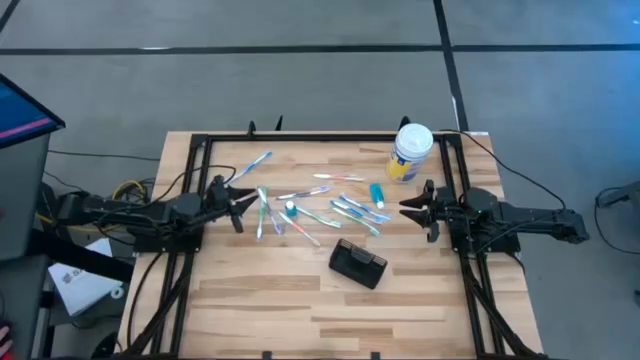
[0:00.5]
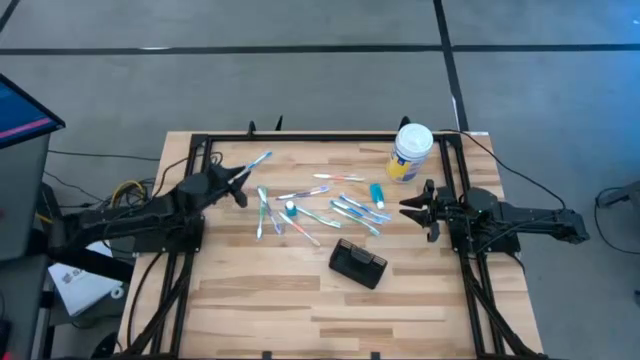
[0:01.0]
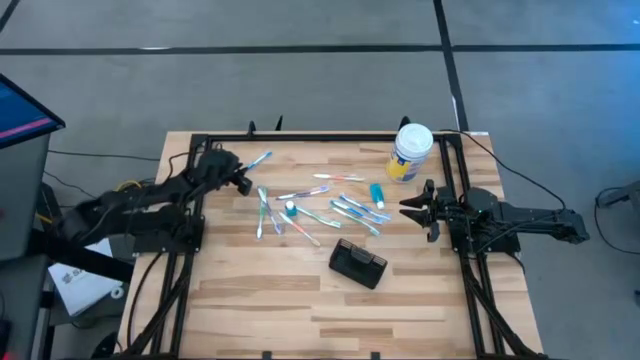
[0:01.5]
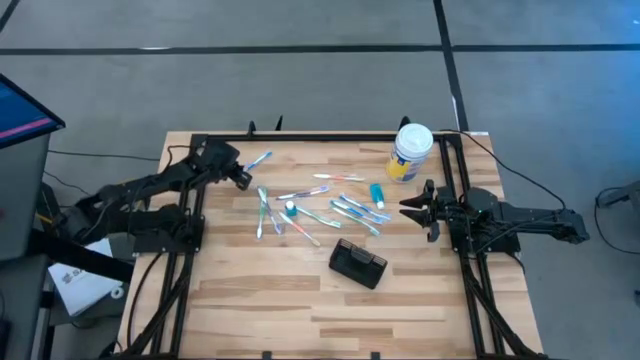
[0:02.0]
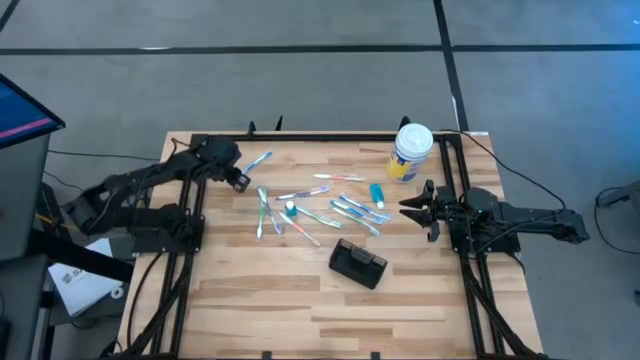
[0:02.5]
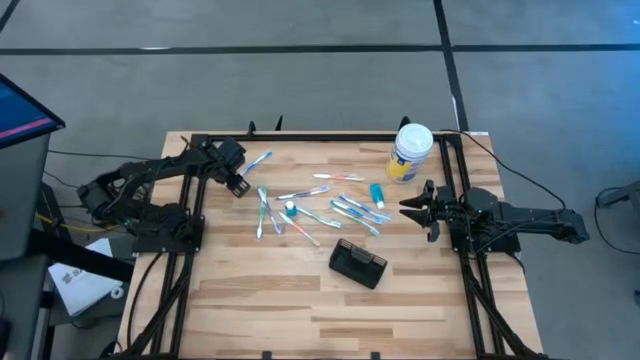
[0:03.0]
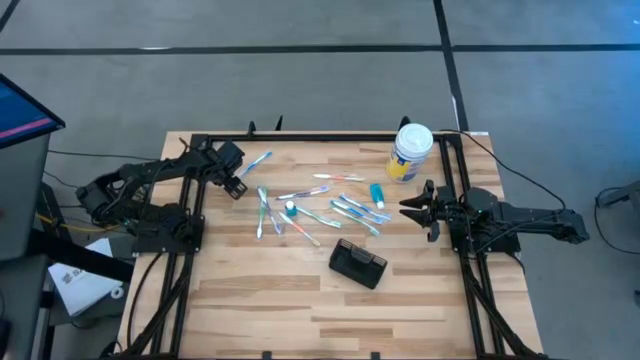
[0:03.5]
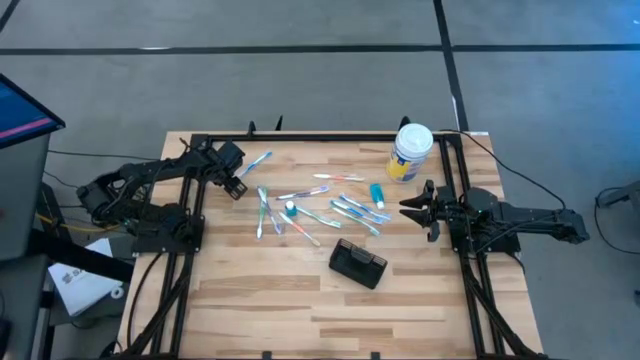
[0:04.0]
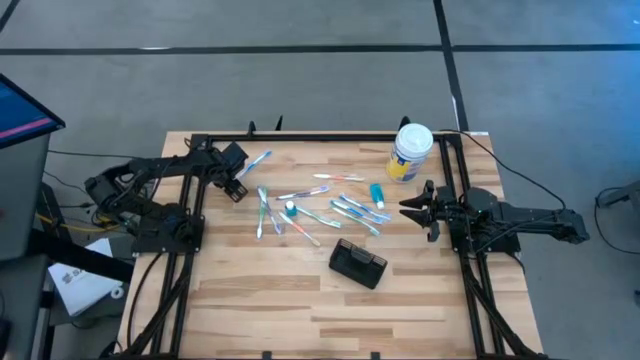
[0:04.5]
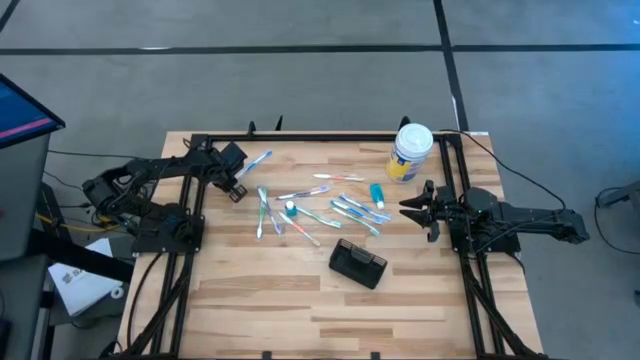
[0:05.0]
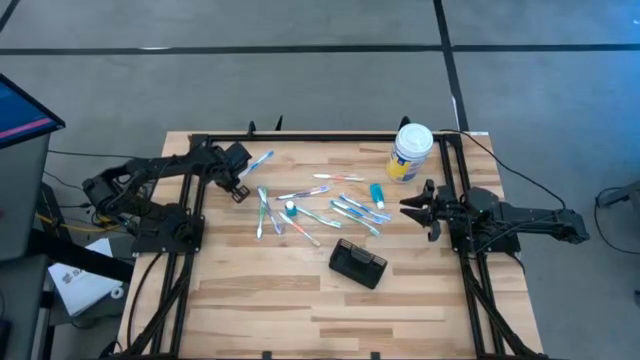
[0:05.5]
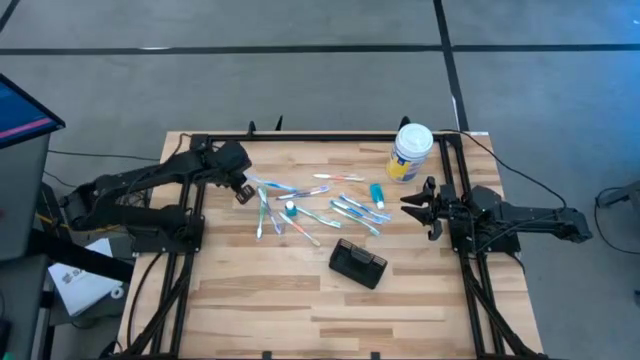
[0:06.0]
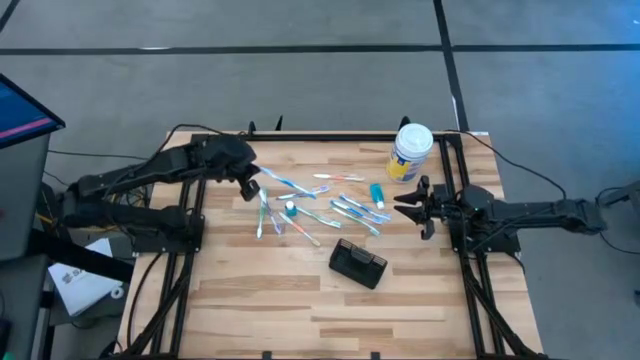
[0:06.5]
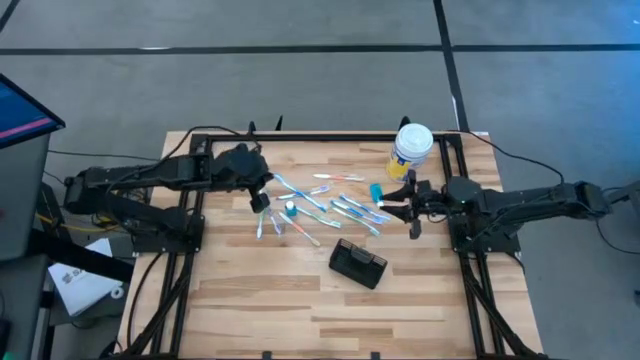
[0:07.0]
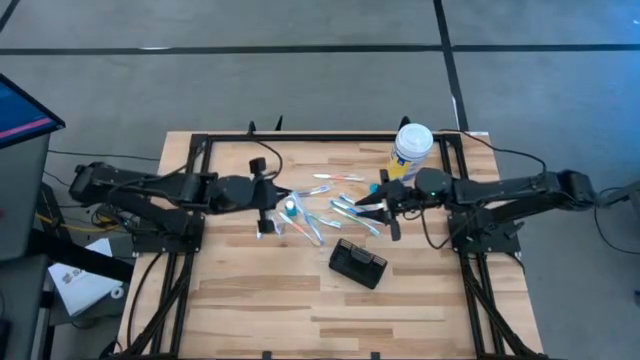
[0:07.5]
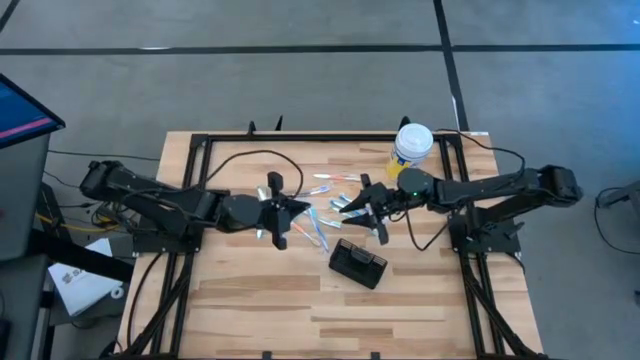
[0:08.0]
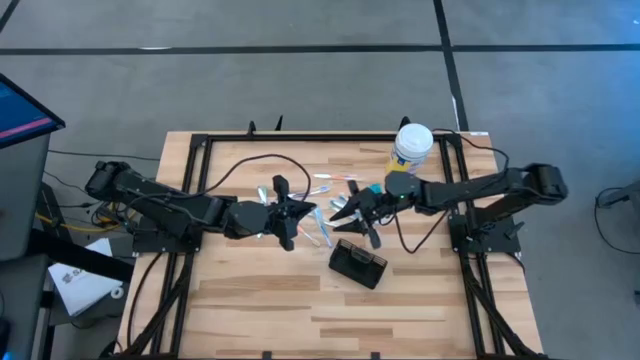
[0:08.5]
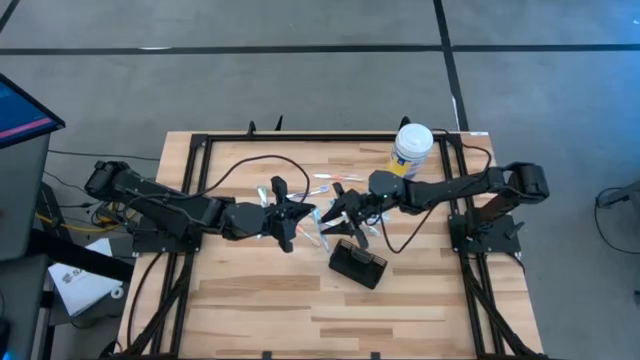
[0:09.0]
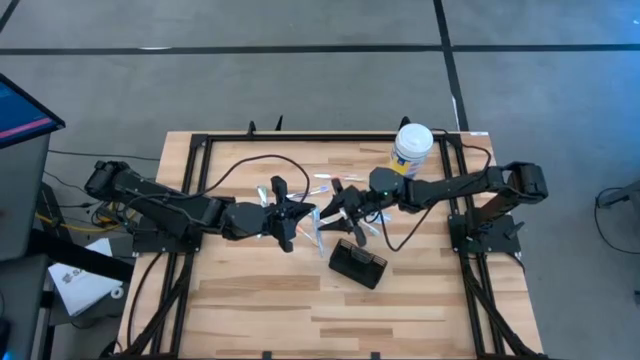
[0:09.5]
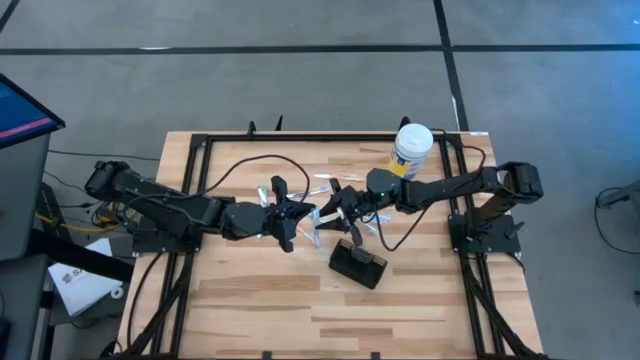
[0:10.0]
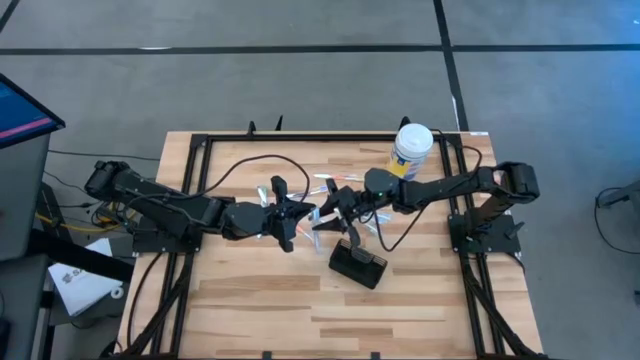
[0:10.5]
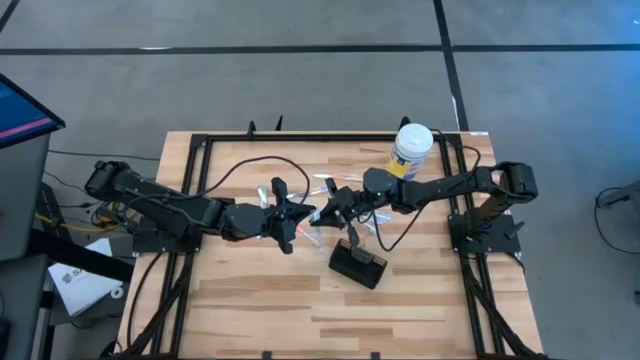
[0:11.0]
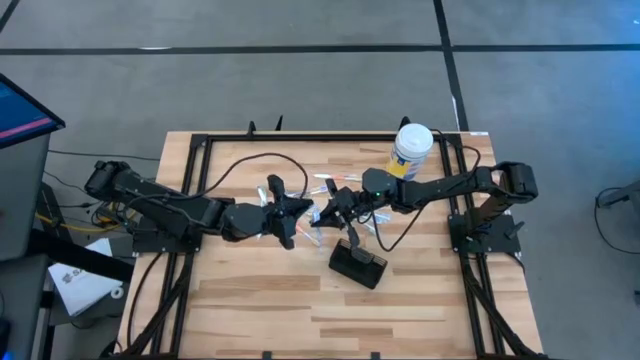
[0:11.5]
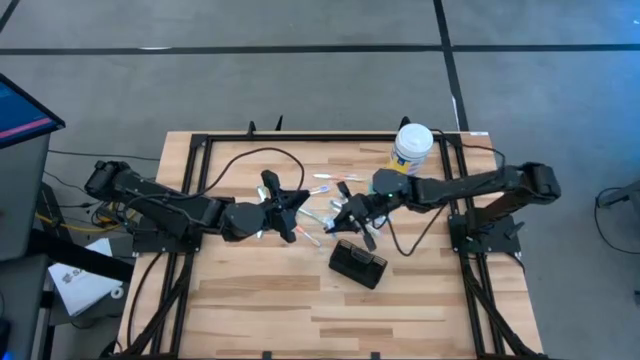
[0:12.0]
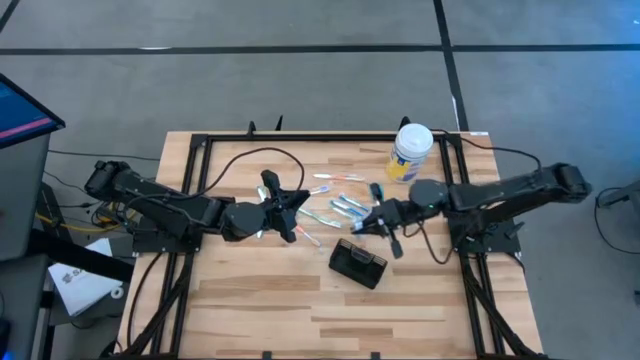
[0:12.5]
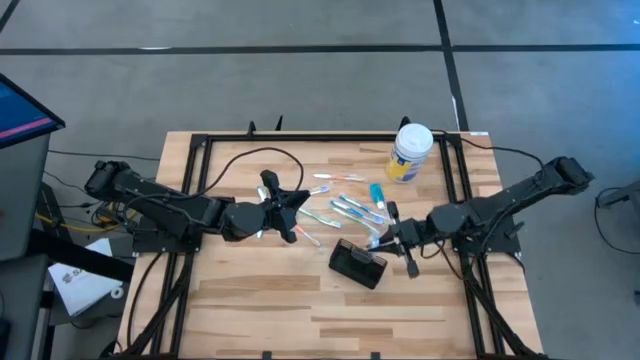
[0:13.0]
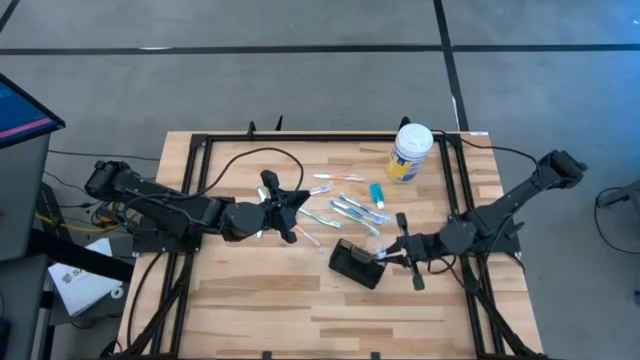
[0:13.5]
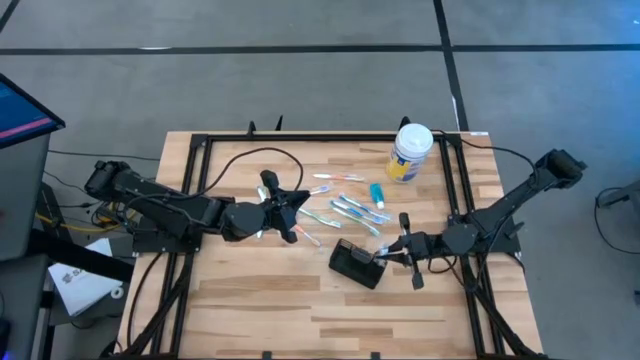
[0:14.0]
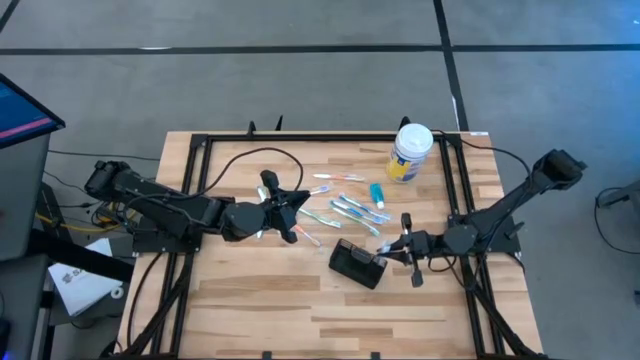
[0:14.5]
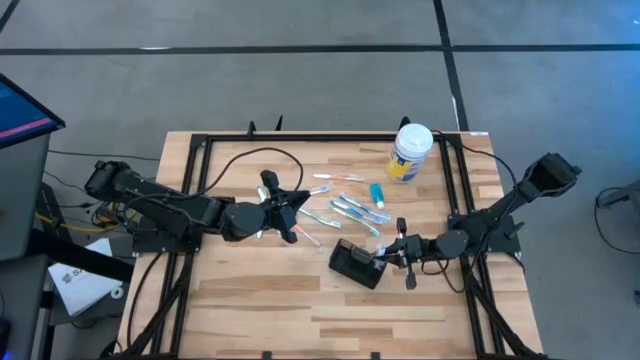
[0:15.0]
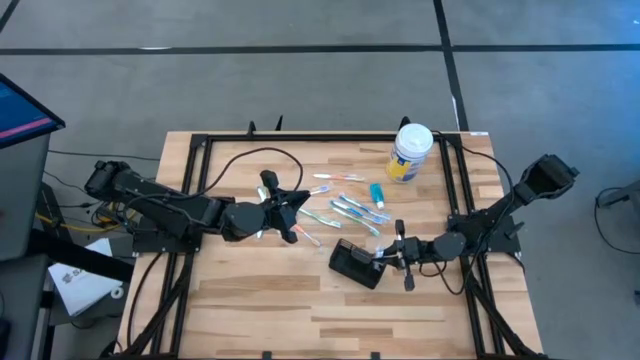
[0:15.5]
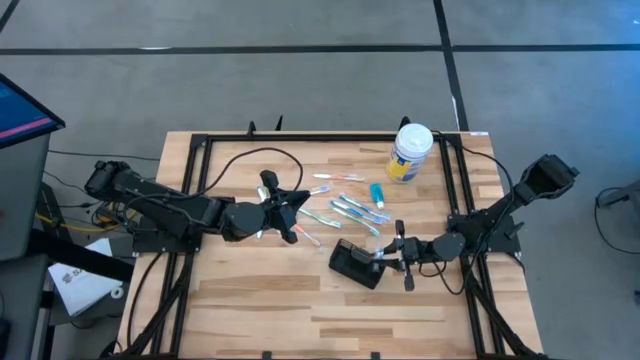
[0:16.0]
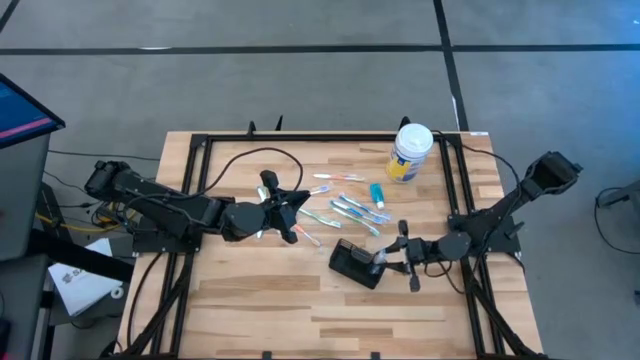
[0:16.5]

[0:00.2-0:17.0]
Task: Pick & Place toothbrushing station
Put the top blue toothbrush into the mesh organizer
